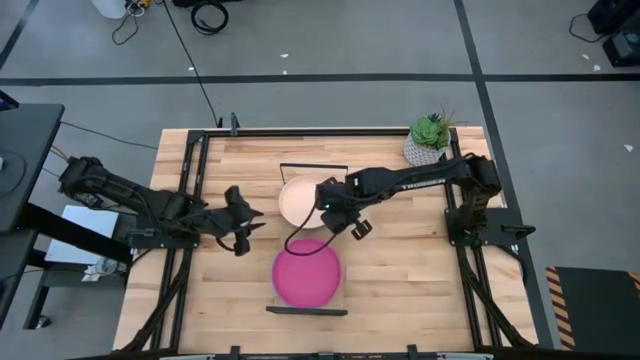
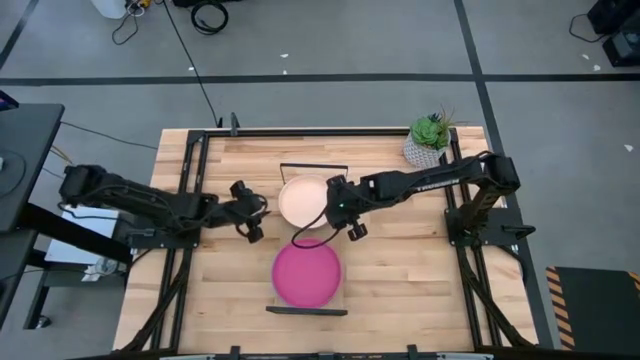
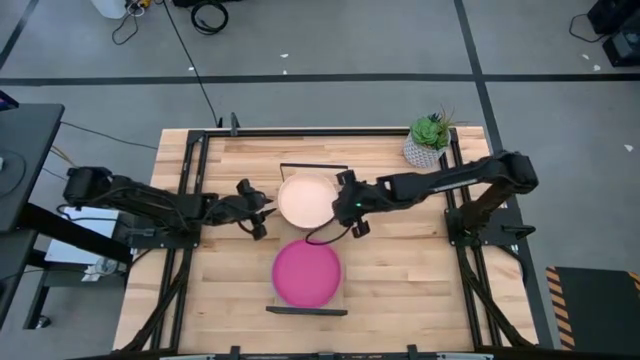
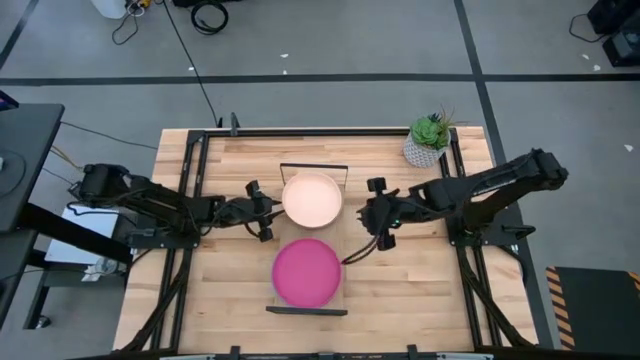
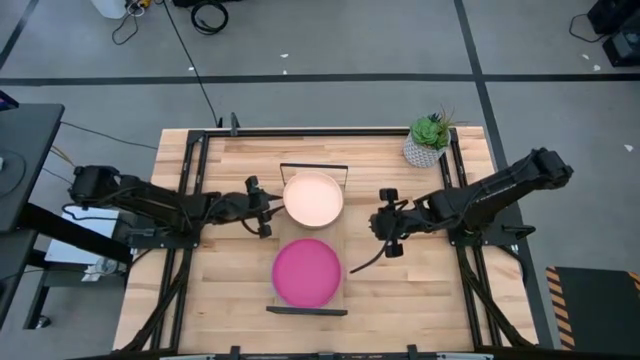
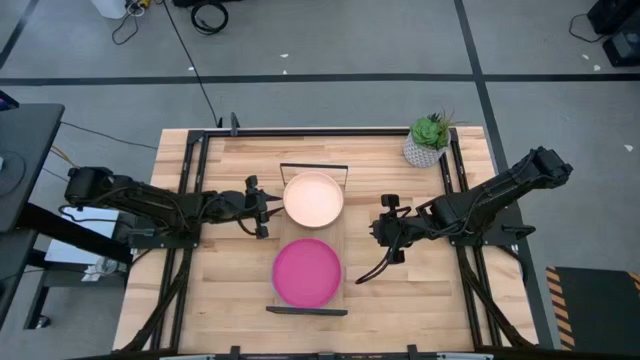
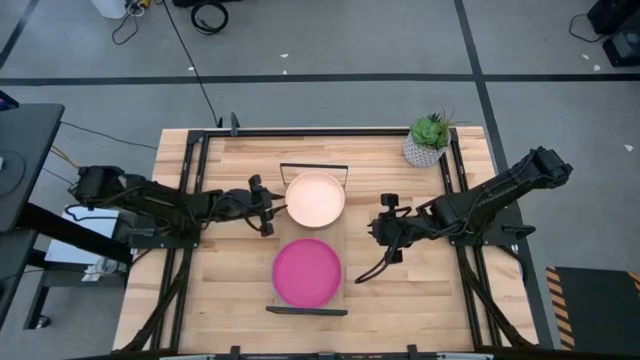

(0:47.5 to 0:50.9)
Task: Place and stack plates onto a shelf
Adjust the stacked plates

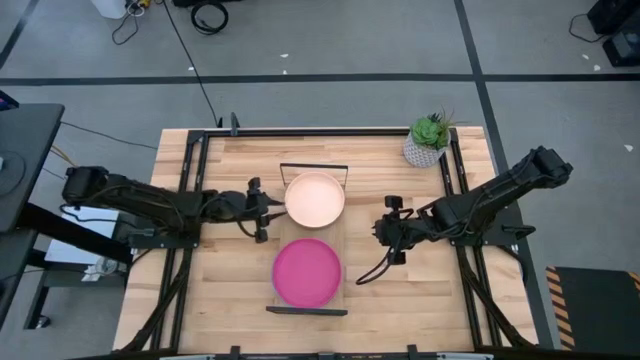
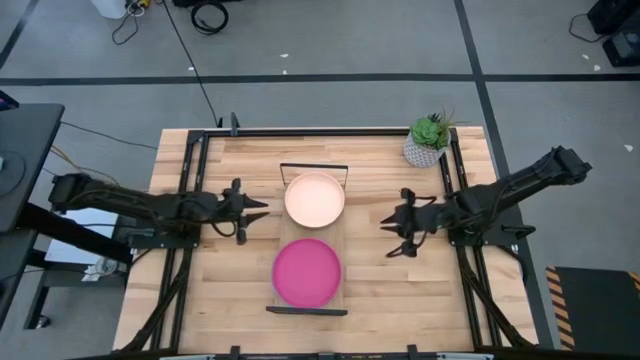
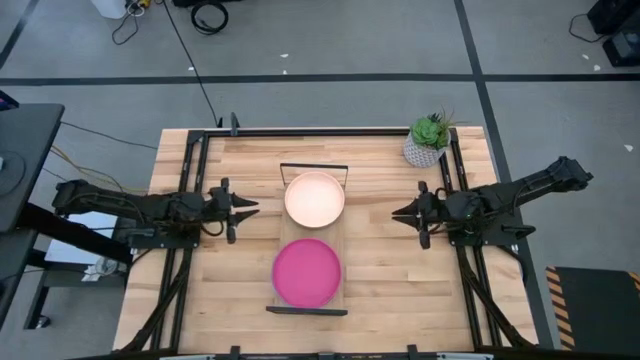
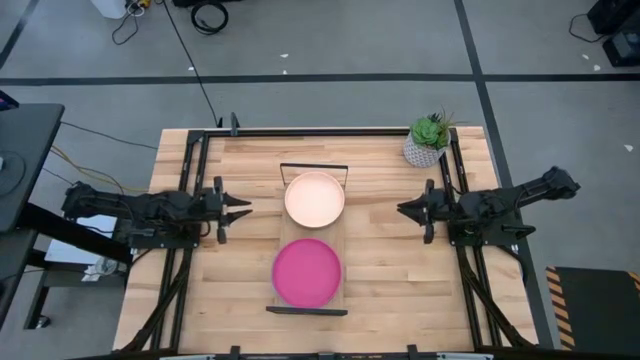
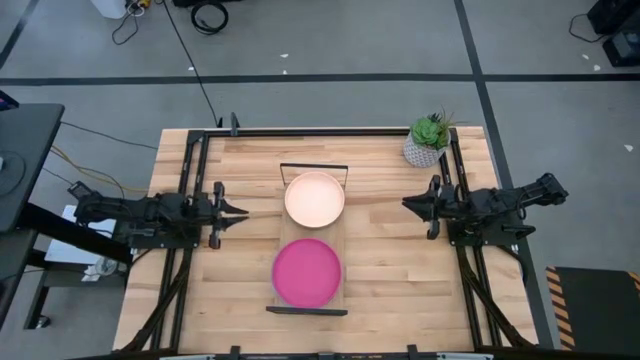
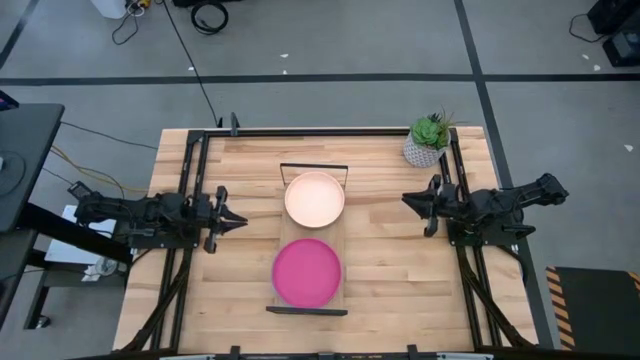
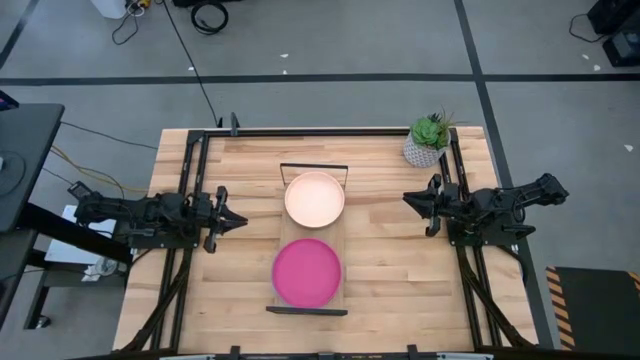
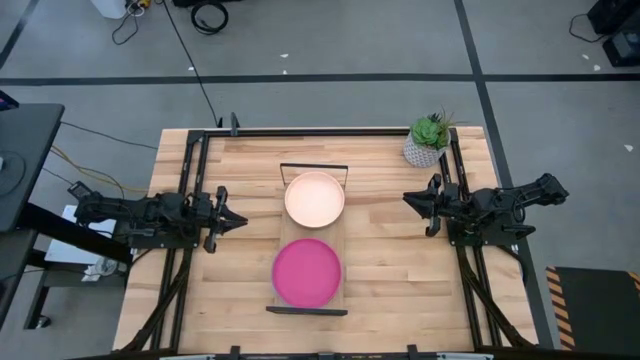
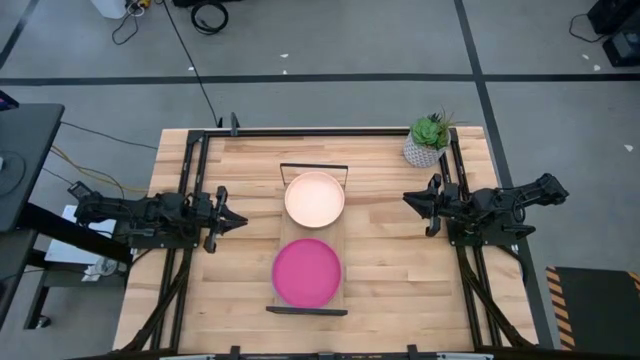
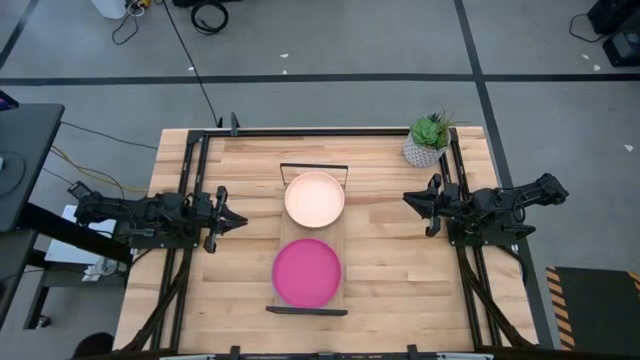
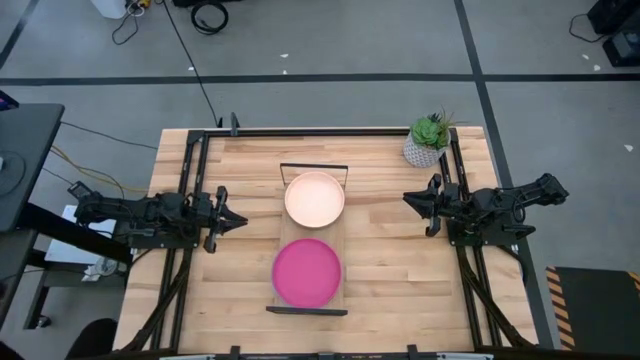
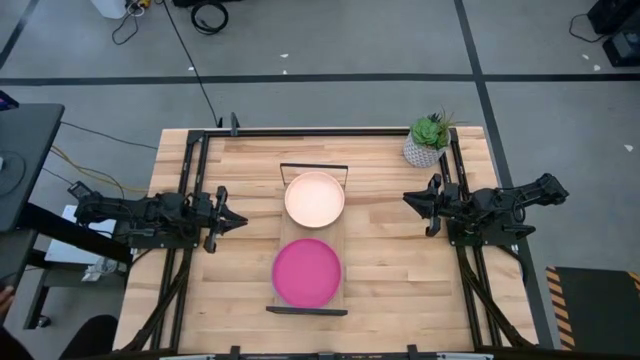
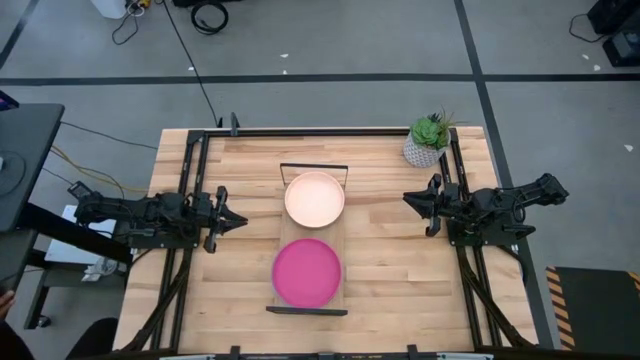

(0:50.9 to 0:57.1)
Return to Home Position

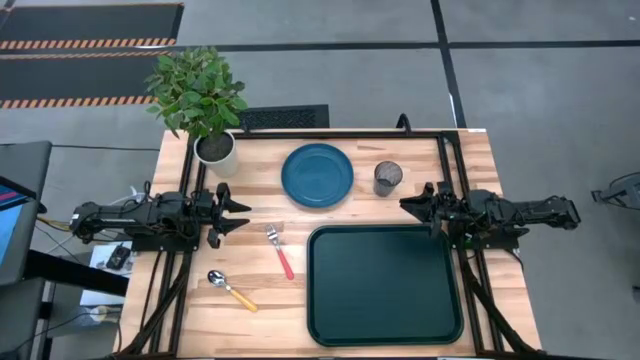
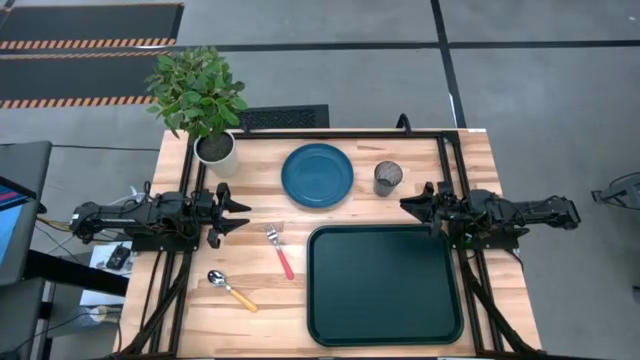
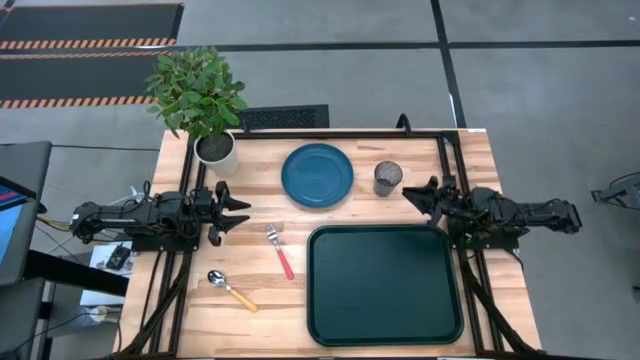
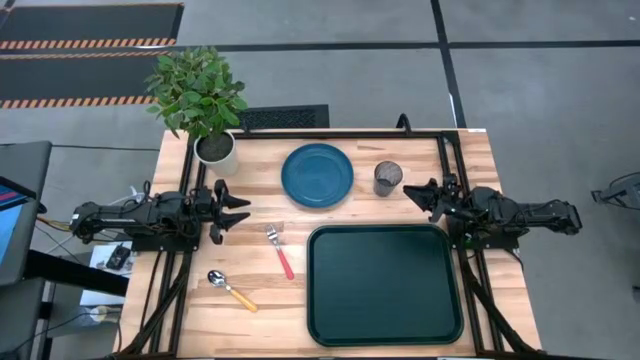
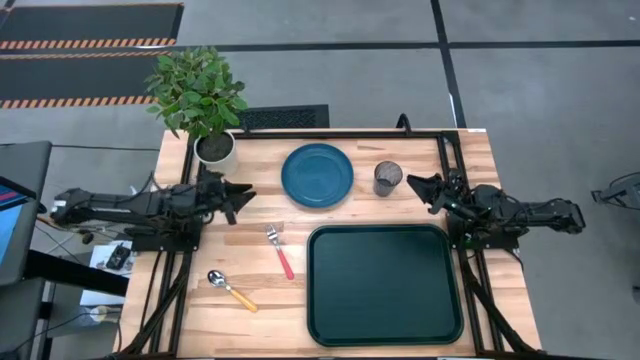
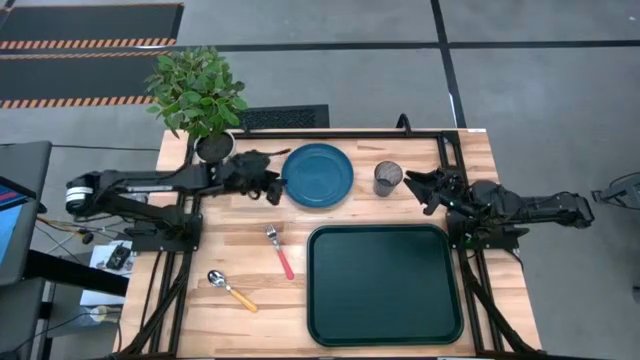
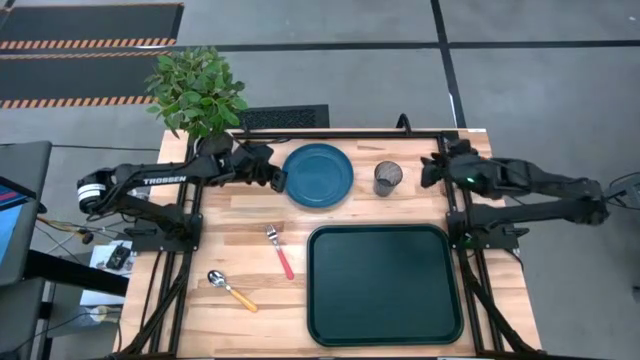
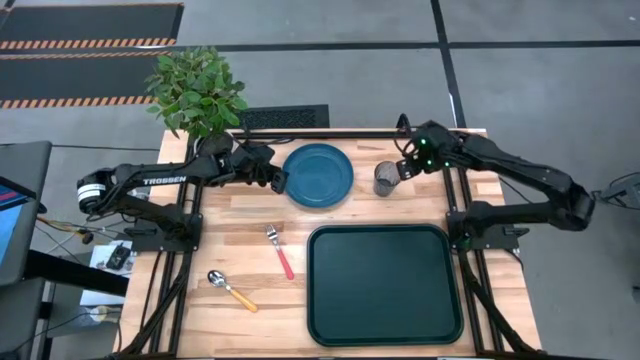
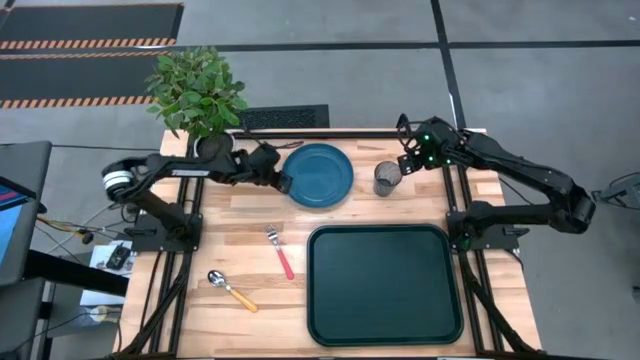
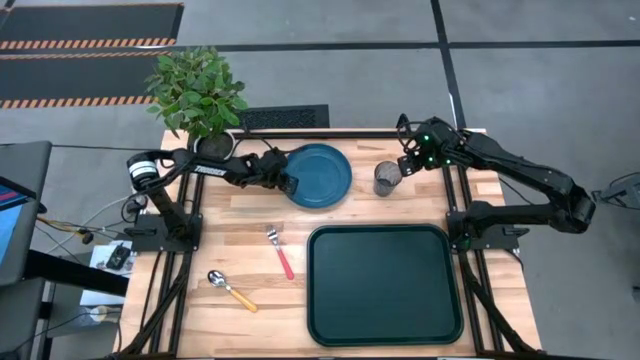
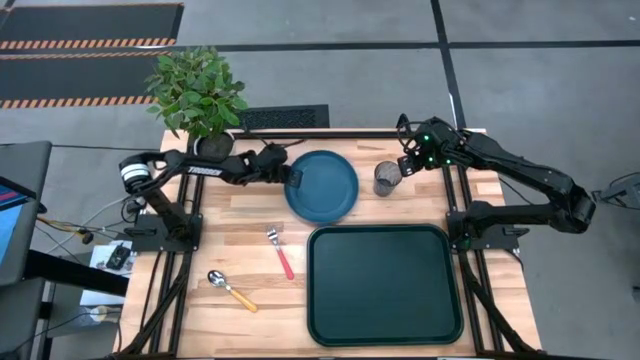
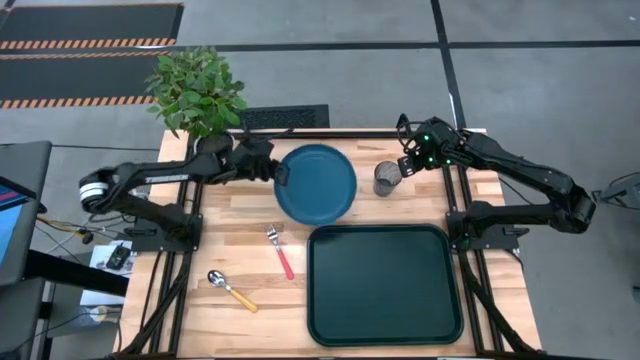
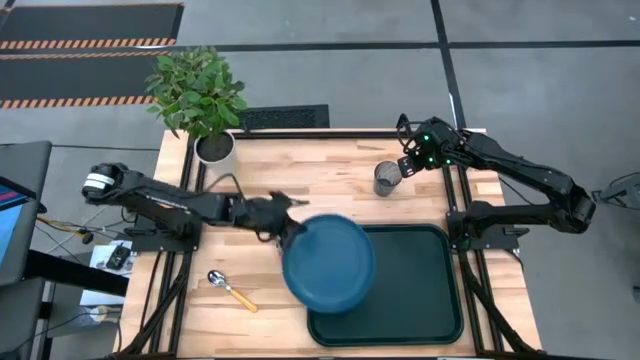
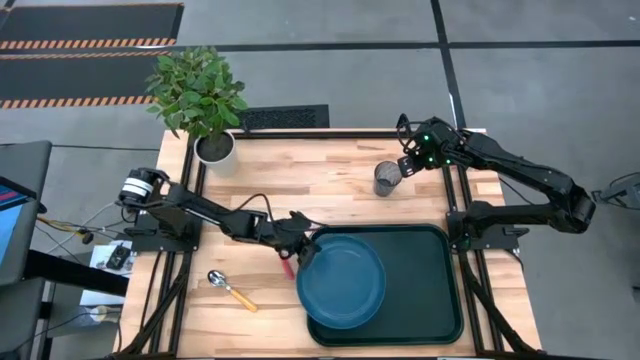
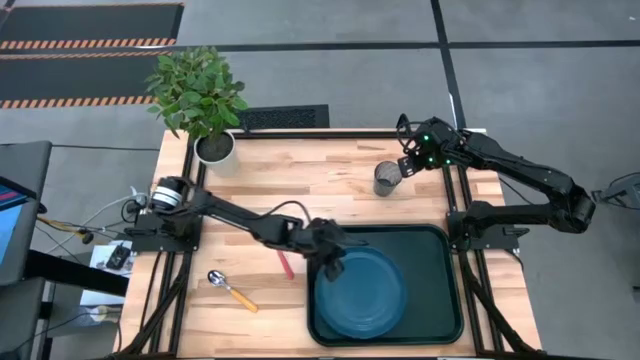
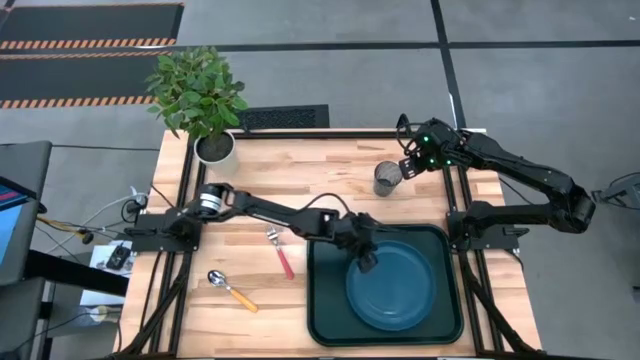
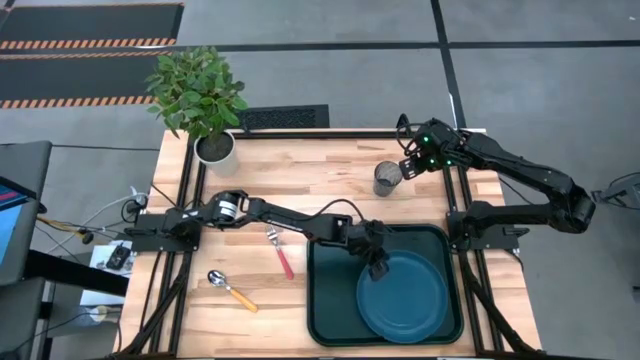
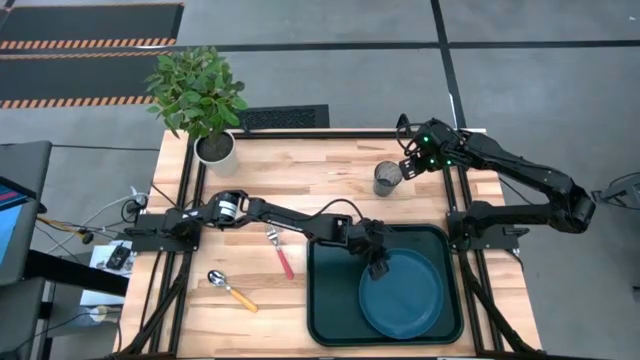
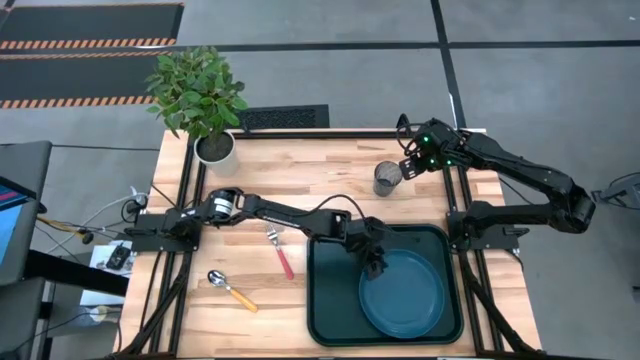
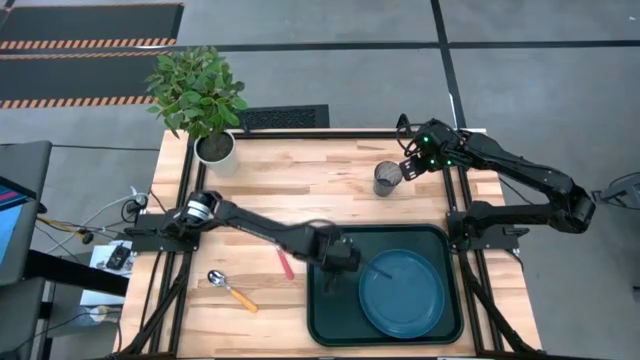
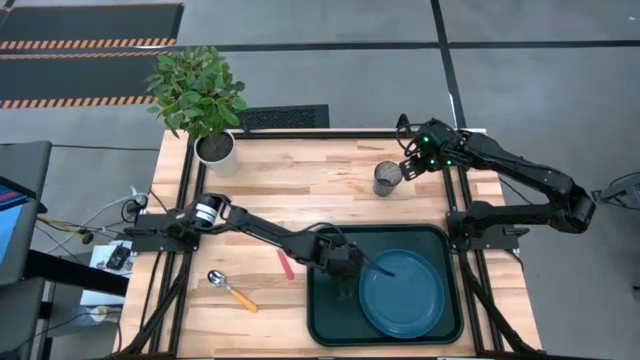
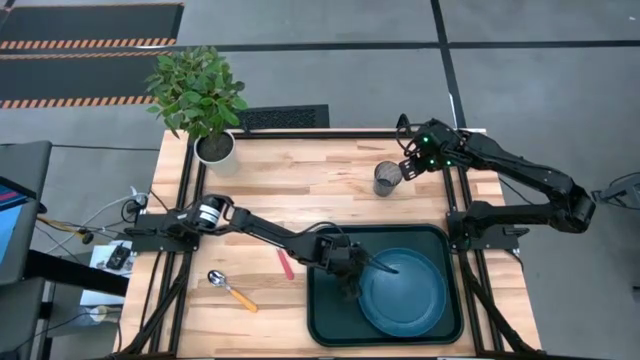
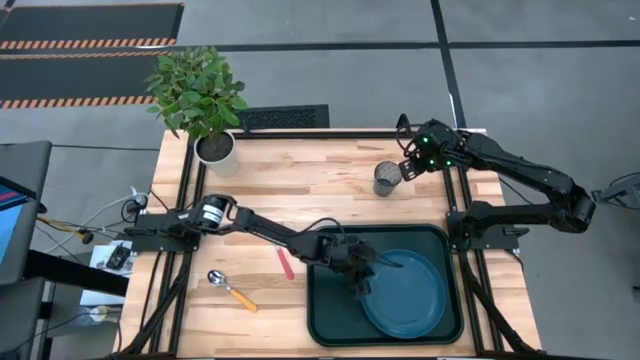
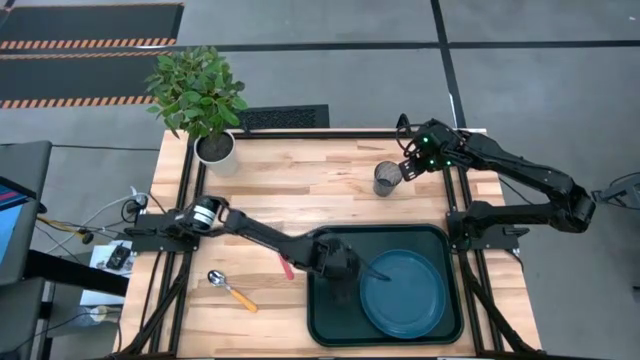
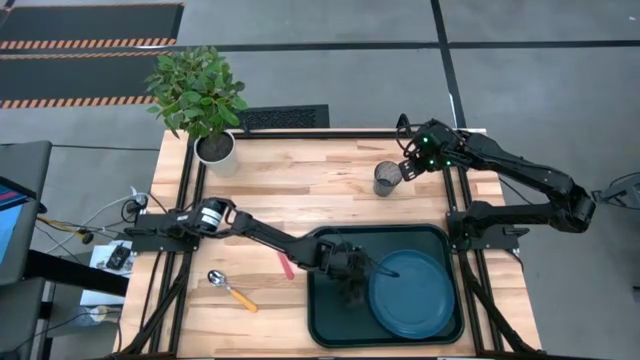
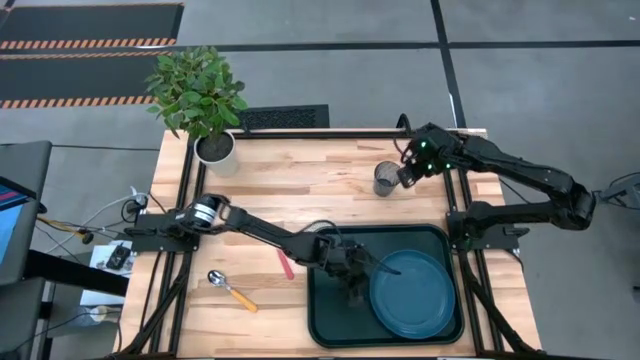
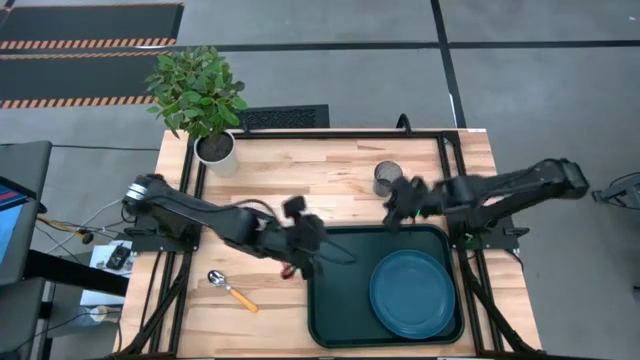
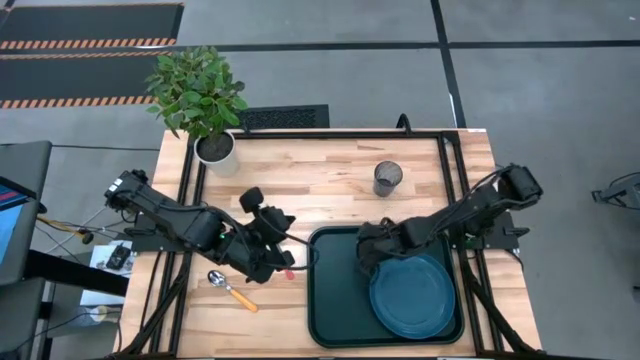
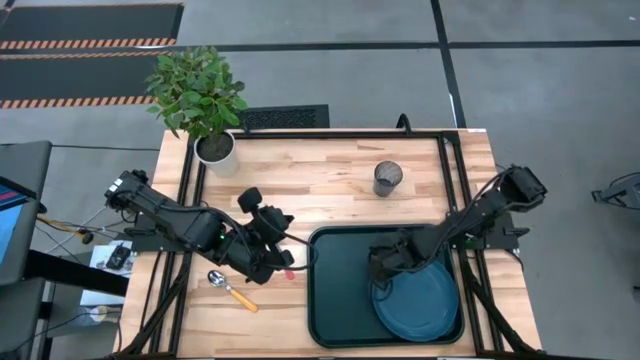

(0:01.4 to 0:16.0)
Task: Pick and place plate/cup/fork/spoon on tray
Put the dark blue plate on the black tray
